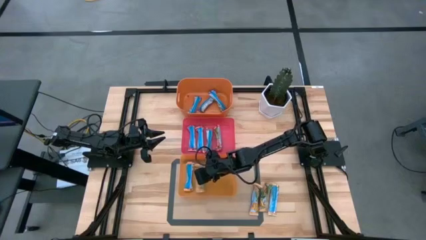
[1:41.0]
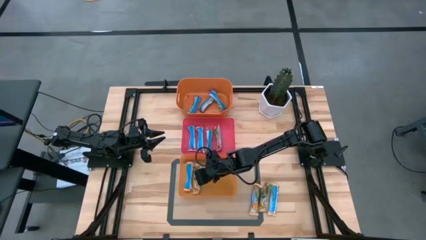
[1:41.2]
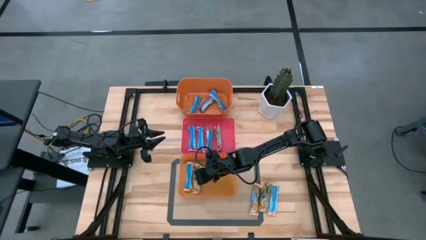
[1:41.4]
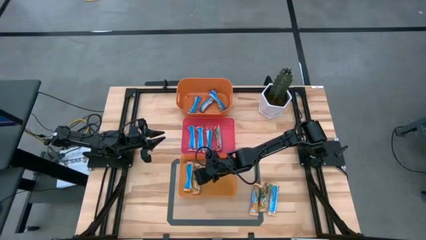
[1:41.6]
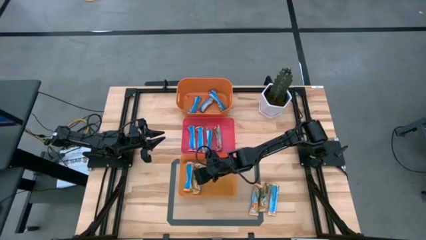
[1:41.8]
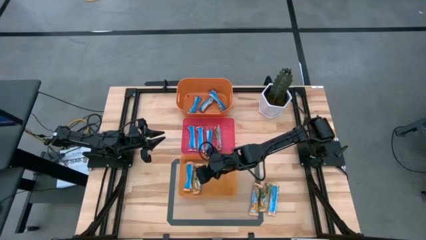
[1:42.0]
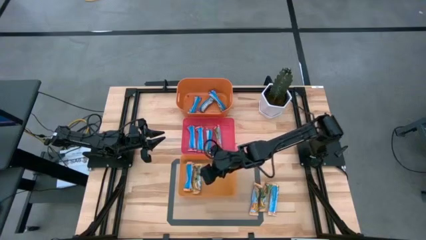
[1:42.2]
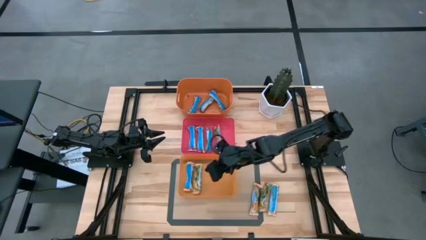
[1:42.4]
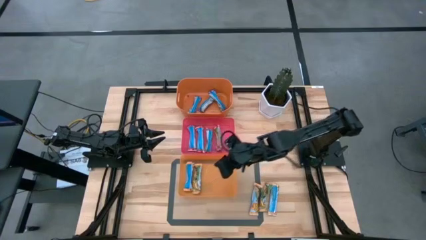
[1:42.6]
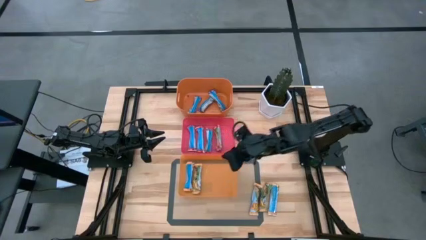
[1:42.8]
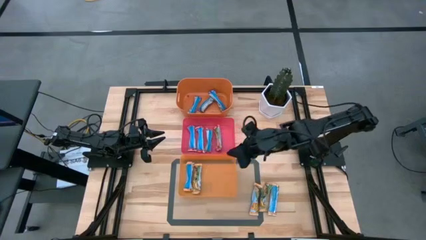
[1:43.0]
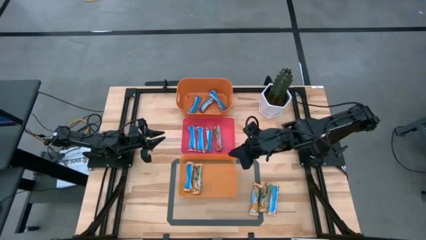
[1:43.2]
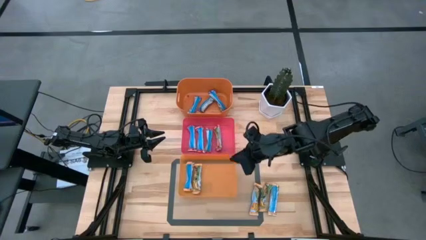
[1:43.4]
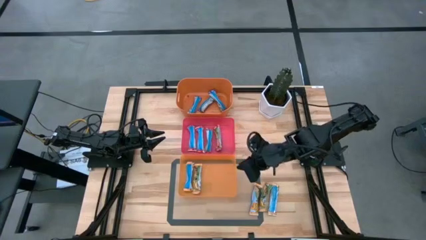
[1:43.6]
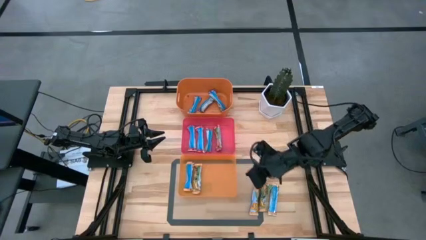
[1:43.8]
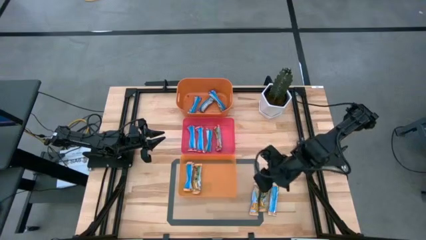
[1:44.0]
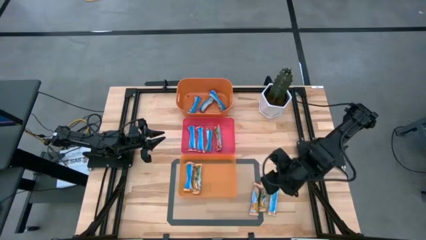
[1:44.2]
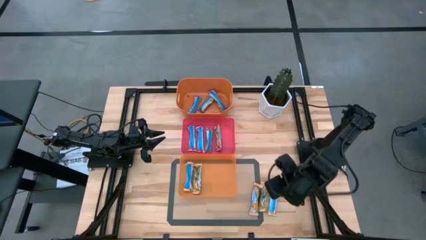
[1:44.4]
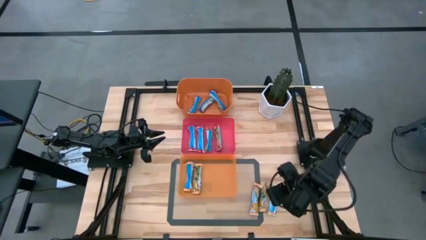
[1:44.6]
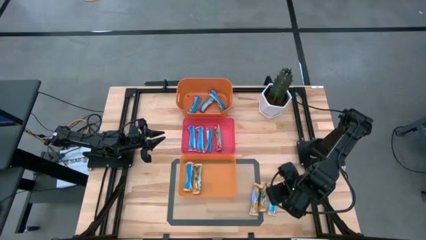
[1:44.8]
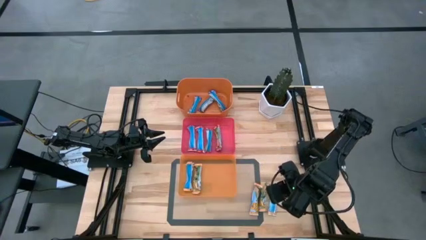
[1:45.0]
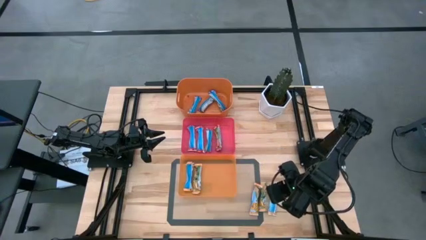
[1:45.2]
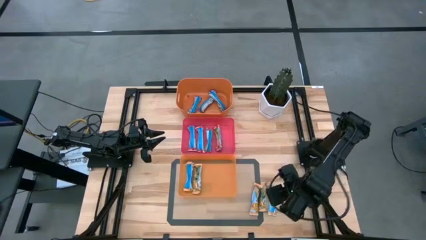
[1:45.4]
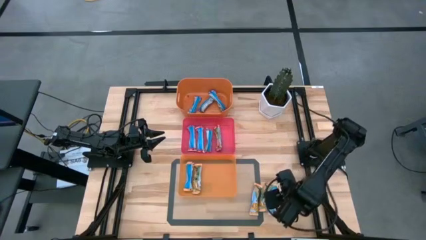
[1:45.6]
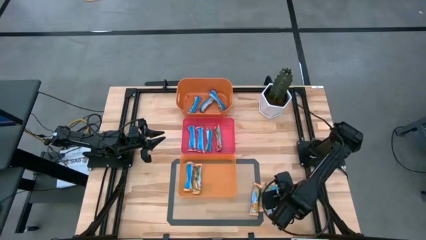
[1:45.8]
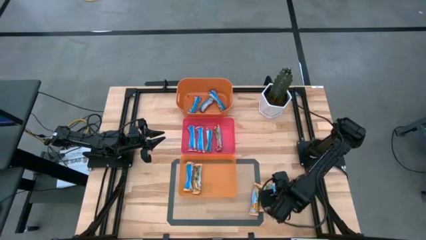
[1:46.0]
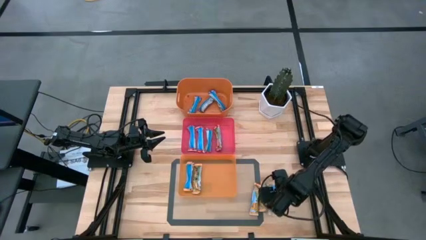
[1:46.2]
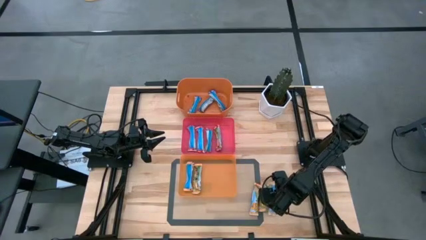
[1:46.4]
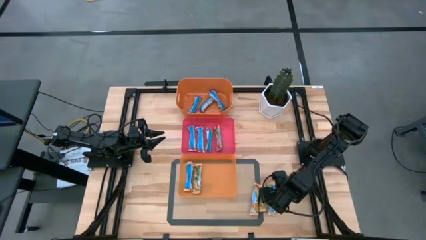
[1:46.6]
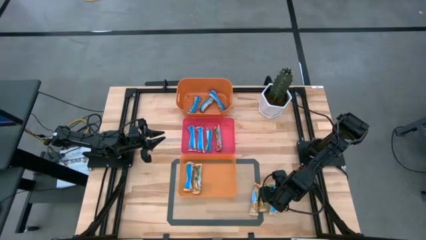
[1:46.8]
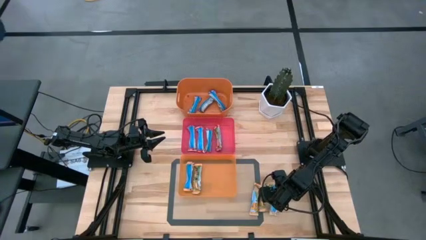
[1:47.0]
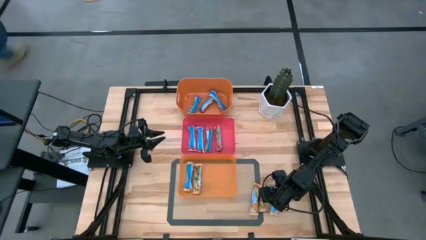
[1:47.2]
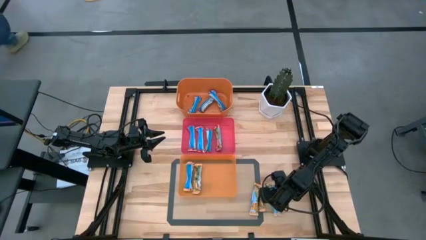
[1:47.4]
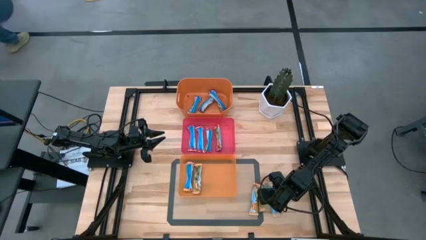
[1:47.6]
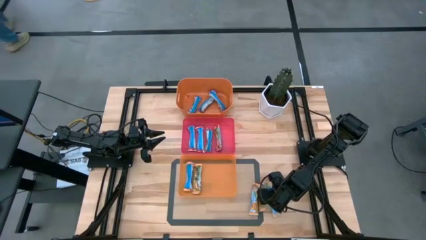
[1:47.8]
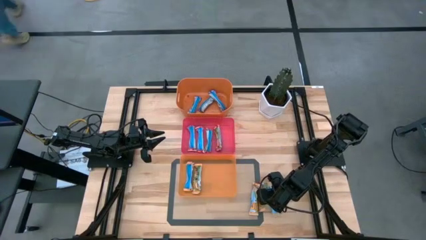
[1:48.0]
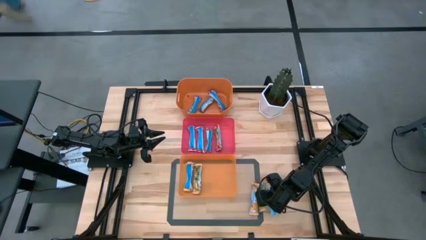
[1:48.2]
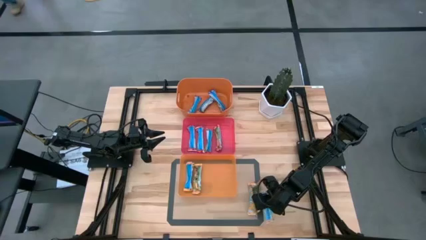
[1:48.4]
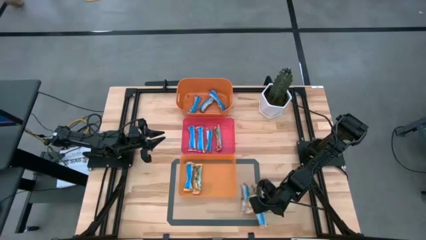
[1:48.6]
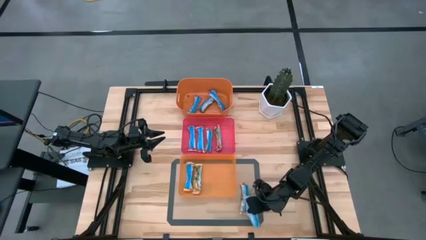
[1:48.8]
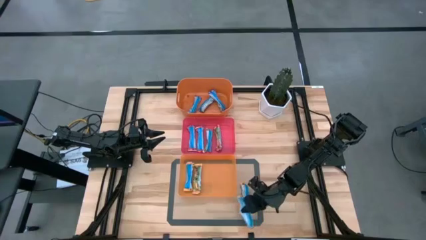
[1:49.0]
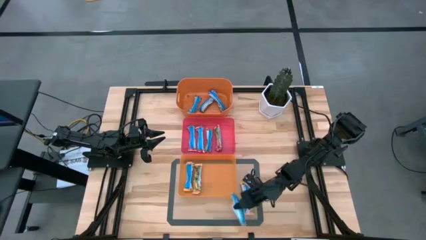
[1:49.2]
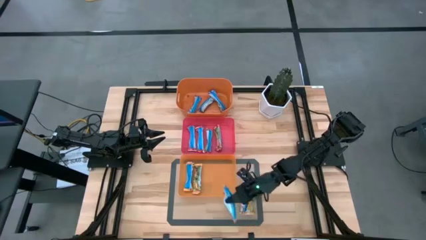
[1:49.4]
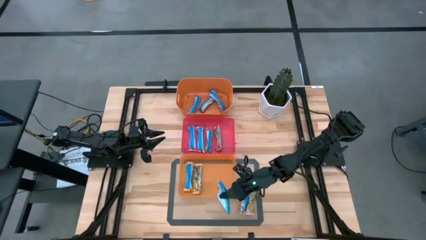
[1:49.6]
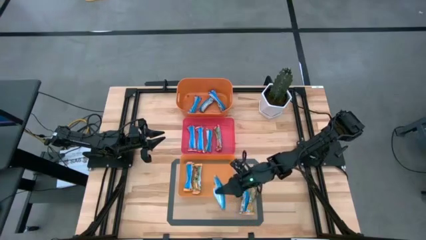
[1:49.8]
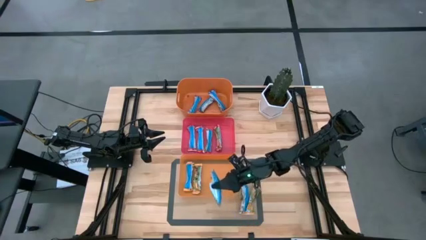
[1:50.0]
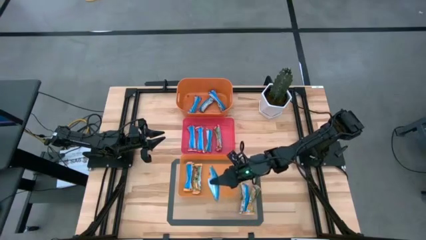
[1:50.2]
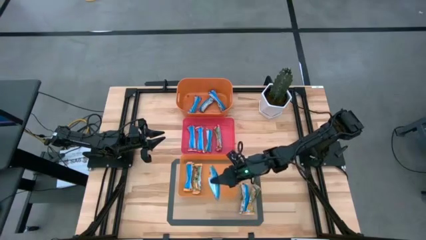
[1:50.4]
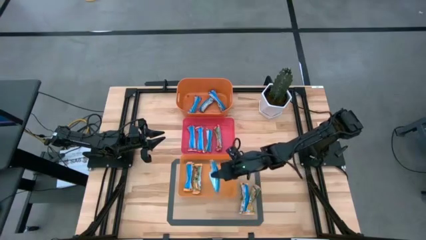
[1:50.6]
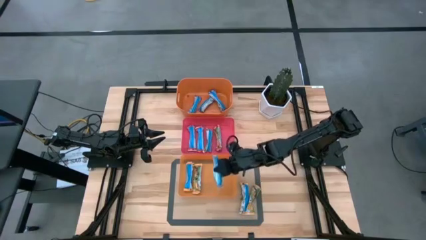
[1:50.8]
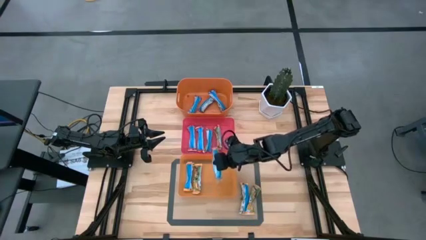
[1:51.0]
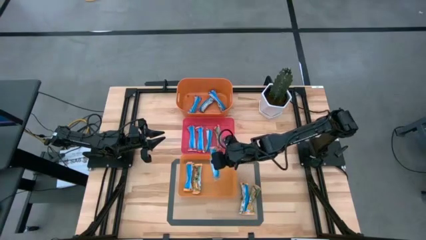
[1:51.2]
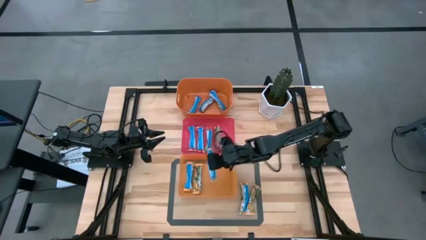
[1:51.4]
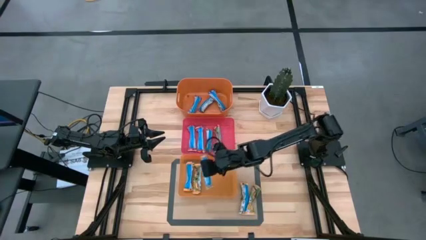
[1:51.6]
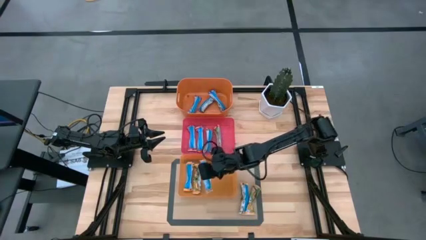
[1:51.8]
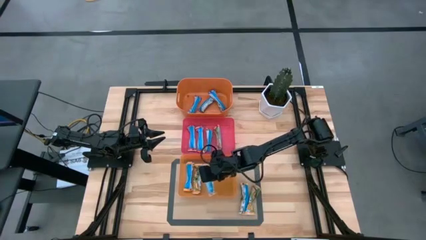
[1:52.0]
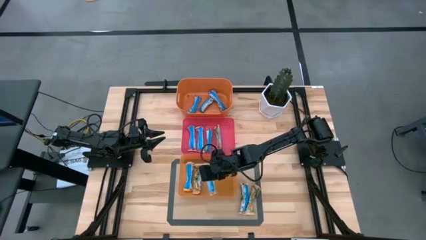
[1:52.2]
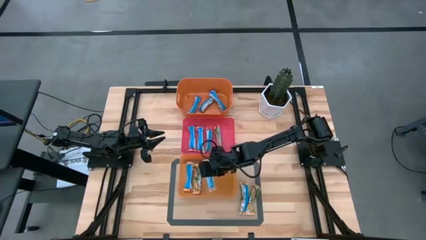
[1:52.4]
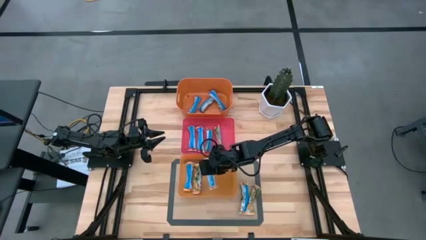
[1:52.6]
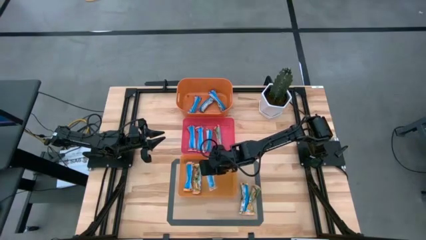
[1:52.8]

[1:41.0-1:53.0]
Task: Pick and place Granola Bars by type
Put the yellow granola bar into the bottom orange bin

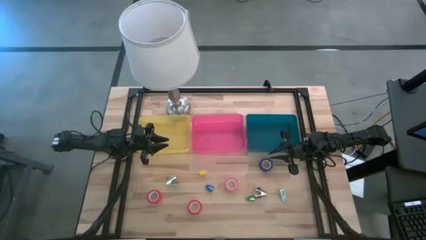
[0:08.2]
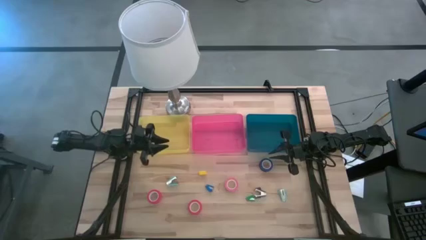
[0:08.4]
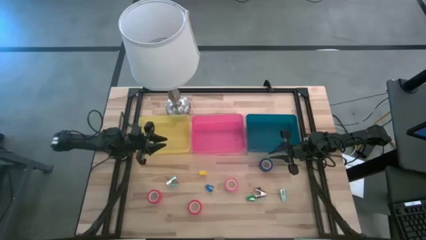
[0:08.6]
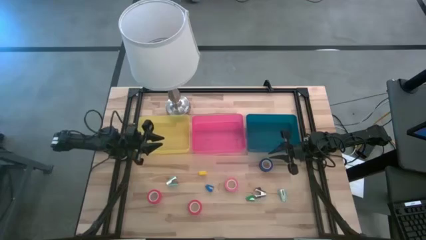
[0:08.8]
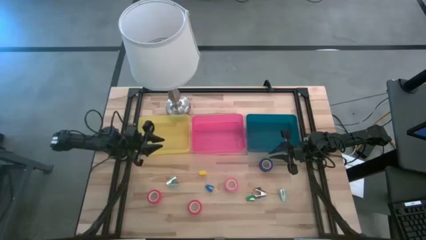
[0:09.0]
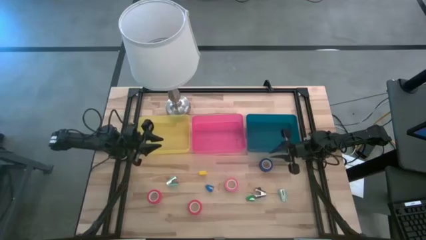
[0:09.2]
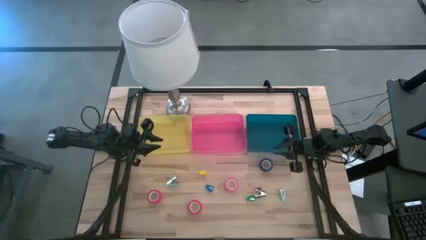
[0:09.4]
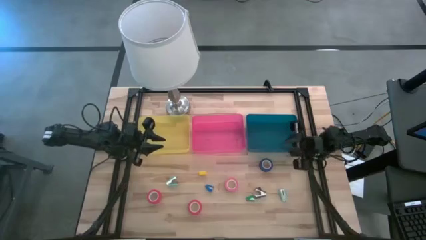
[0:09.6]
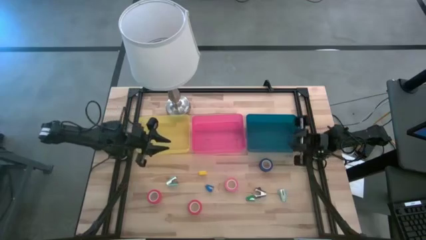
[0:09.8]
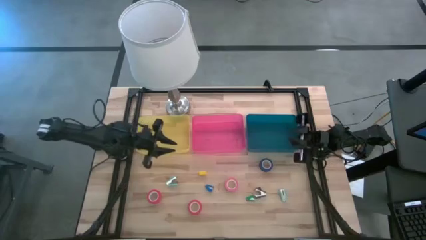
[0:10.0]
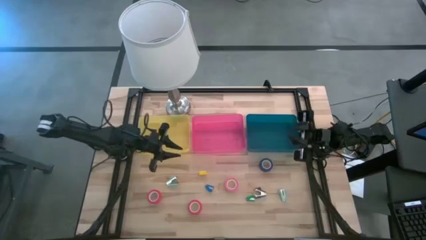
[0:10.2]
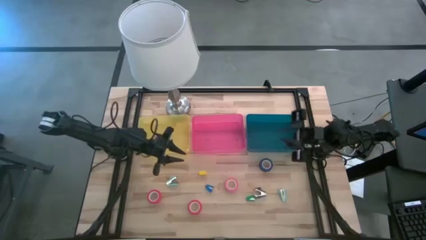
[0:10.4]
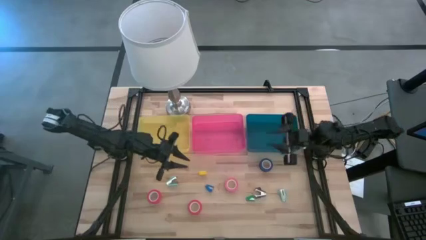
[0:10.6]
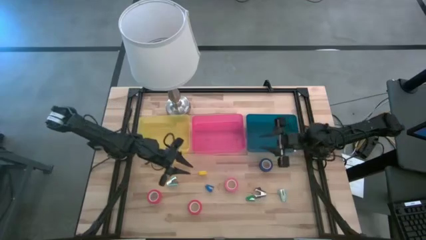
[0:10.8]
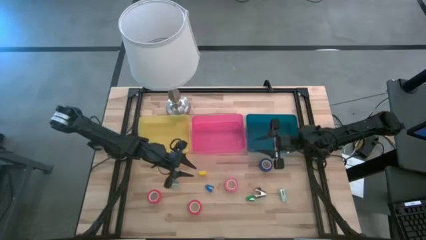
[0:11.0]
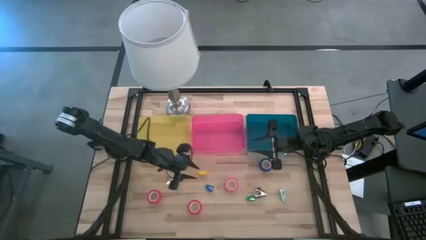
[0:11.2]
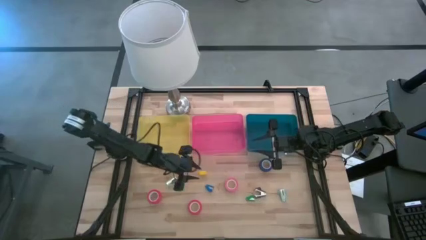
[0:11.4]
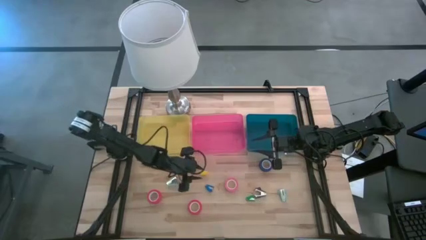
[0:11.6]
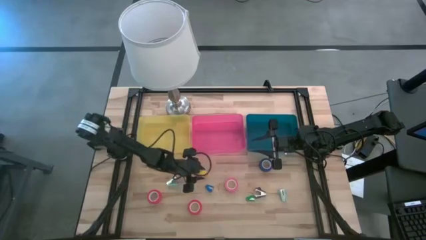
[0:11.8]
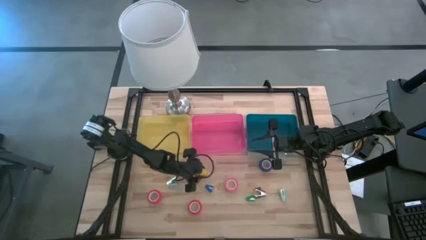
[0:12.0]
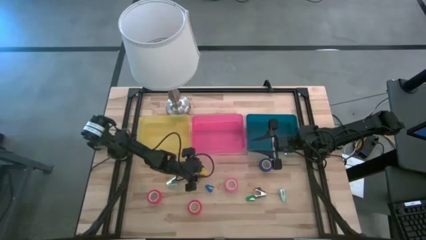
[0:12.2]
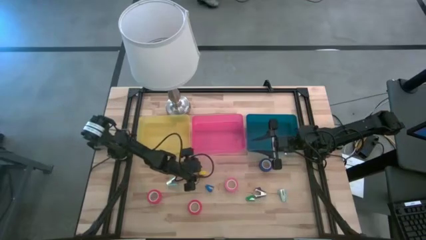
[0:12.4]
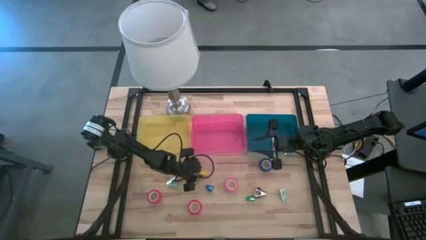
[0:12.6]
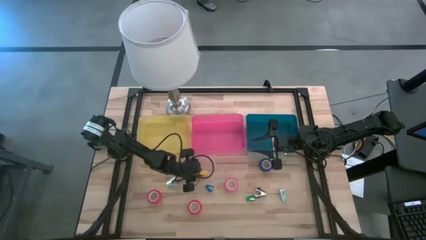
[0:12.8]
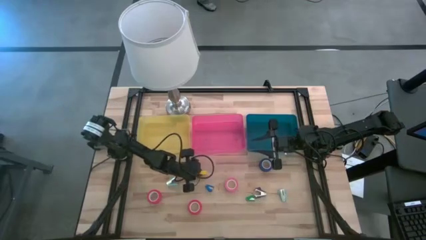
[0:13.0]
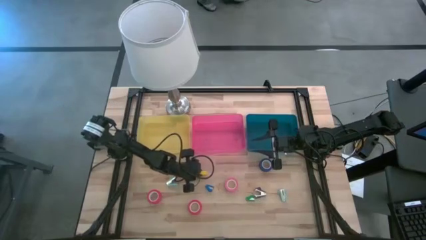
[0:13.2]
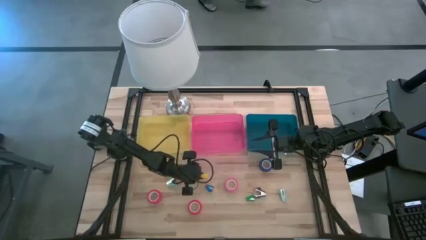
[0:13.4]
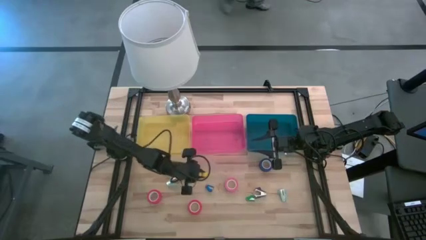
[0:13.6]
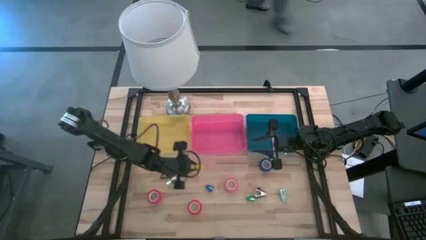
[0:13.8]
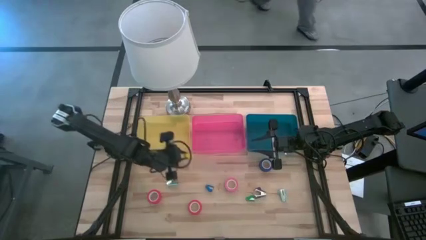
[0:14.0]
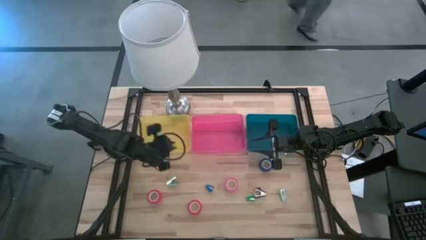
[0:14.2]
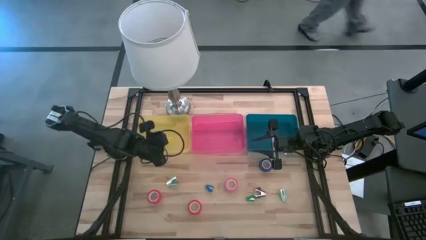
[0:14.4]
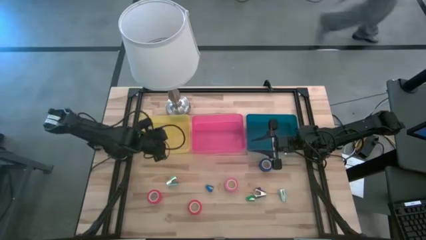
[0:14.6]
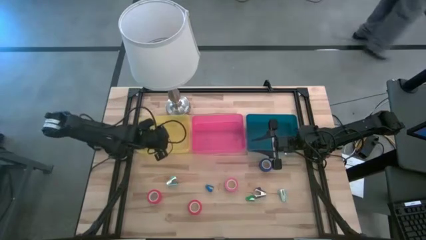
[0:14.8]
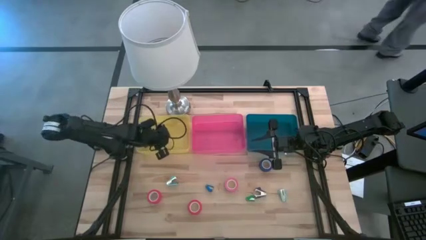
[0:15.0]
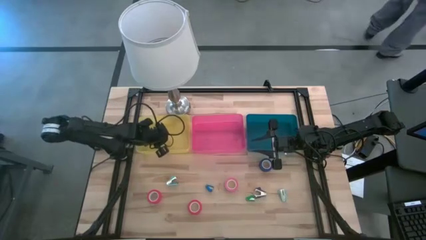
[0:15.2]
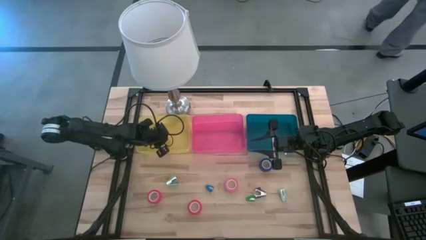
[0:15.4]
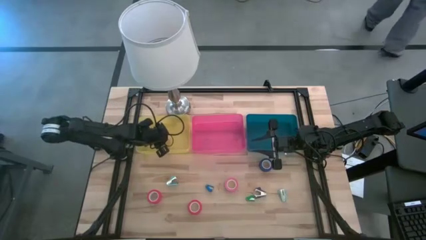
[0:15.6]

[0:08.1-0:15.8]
Task: Pick and place Stapler, Stapler remover, tape
Put the yellow stapler into the yellow bin
